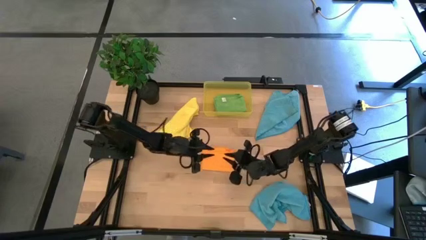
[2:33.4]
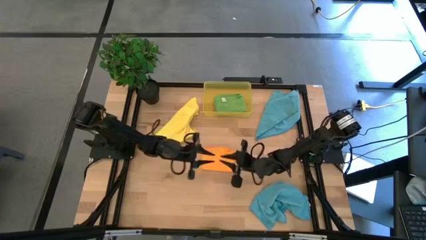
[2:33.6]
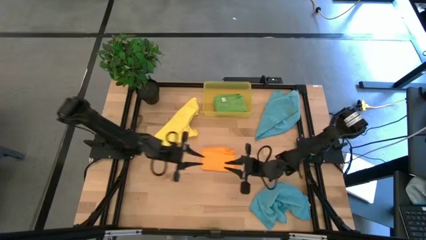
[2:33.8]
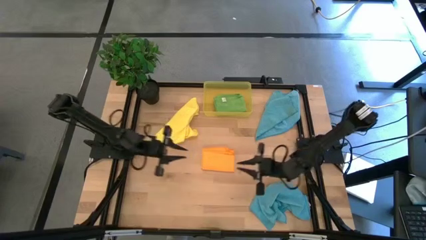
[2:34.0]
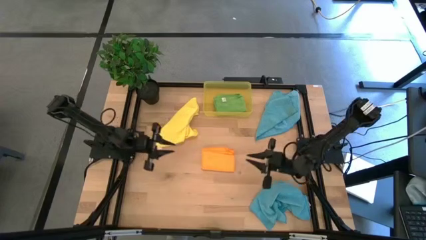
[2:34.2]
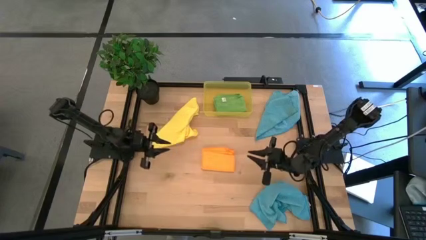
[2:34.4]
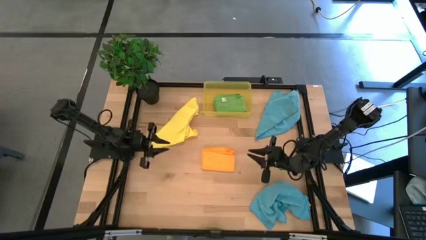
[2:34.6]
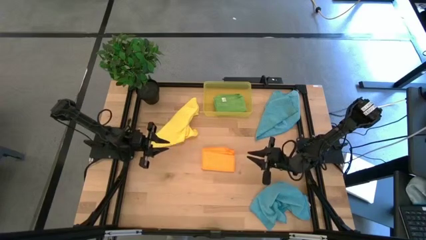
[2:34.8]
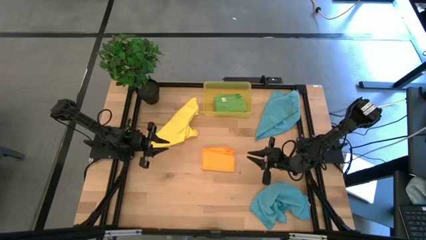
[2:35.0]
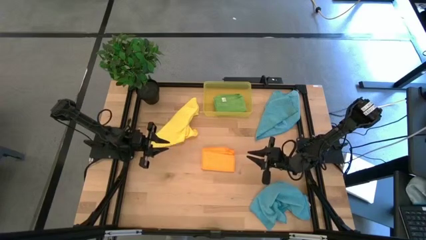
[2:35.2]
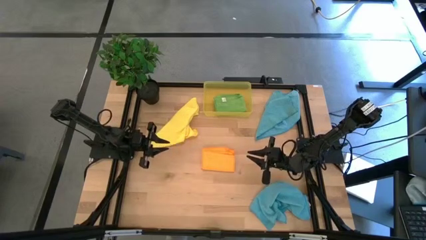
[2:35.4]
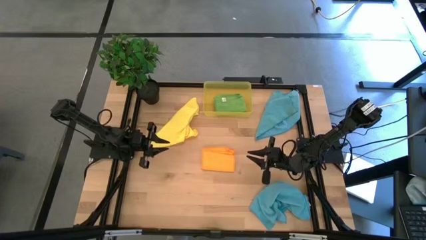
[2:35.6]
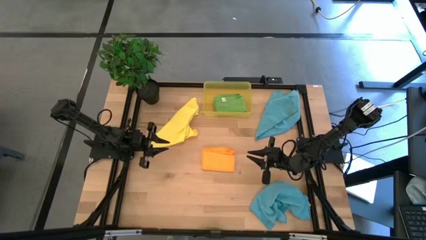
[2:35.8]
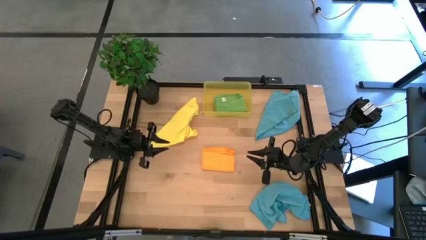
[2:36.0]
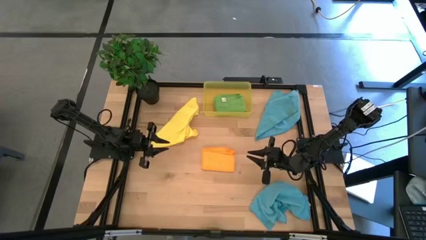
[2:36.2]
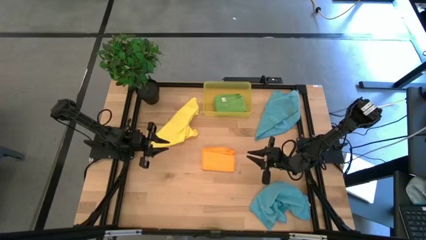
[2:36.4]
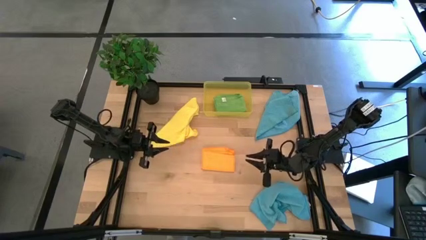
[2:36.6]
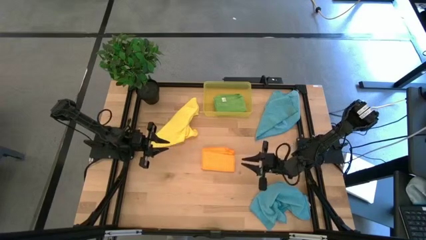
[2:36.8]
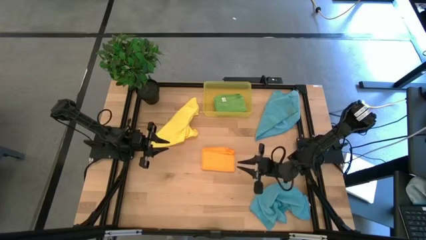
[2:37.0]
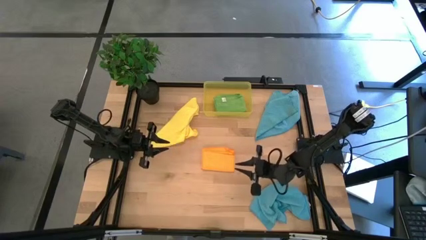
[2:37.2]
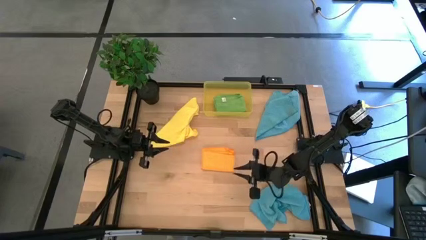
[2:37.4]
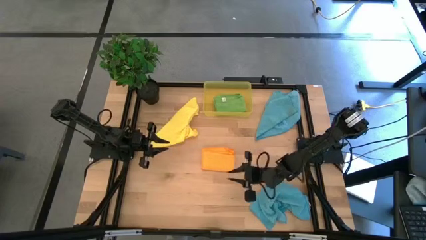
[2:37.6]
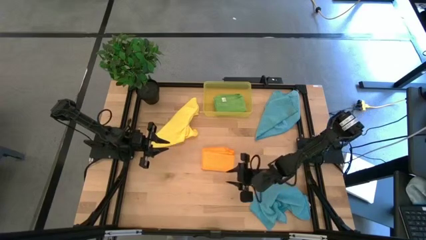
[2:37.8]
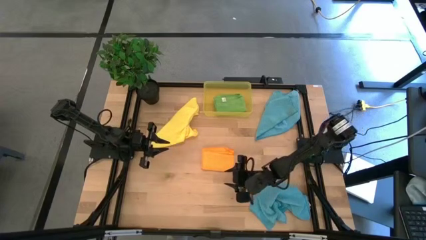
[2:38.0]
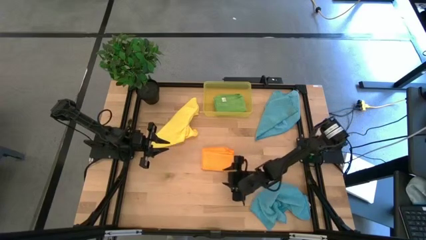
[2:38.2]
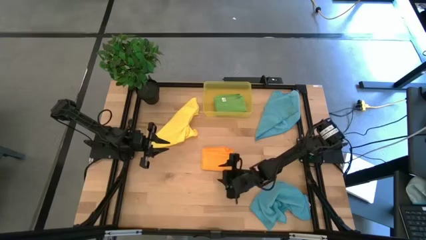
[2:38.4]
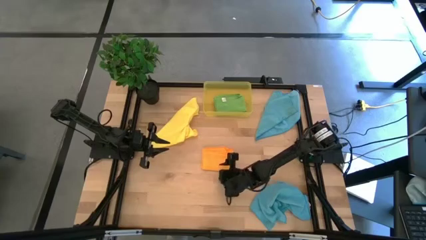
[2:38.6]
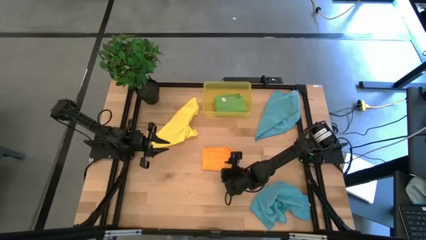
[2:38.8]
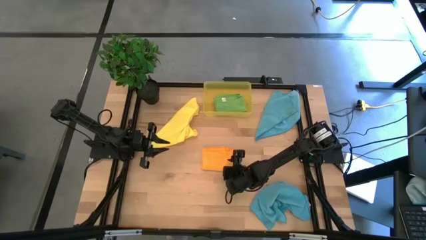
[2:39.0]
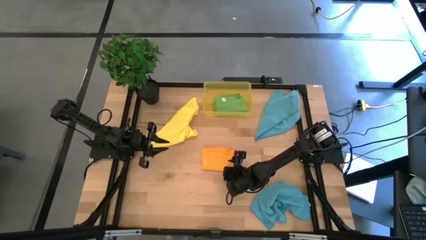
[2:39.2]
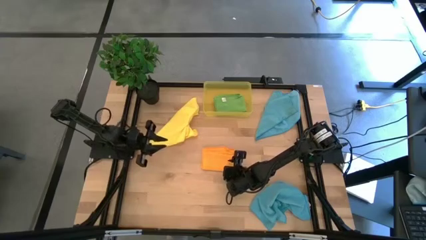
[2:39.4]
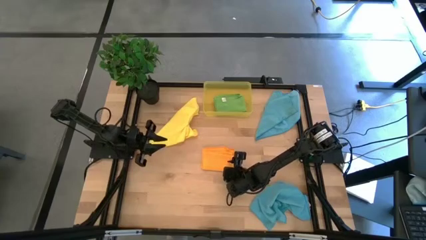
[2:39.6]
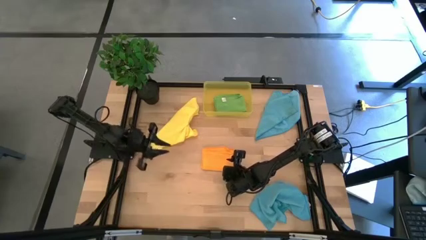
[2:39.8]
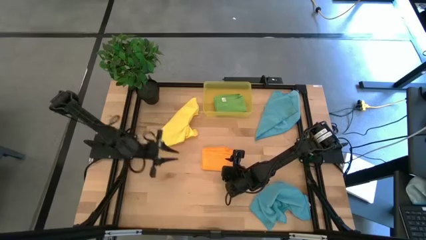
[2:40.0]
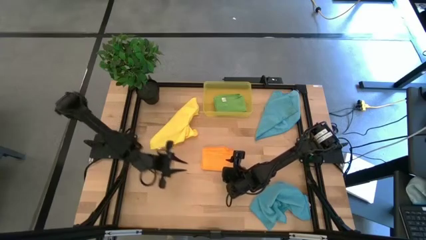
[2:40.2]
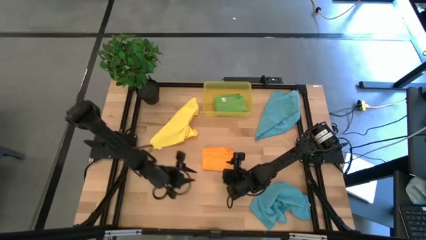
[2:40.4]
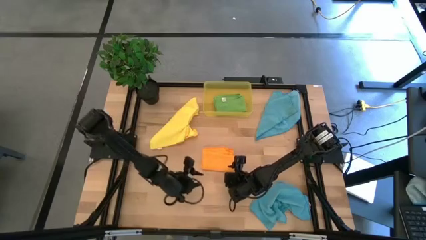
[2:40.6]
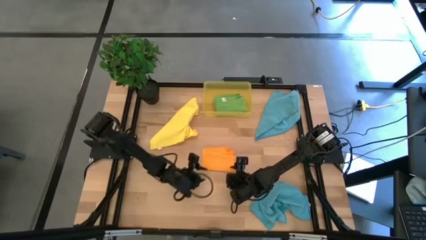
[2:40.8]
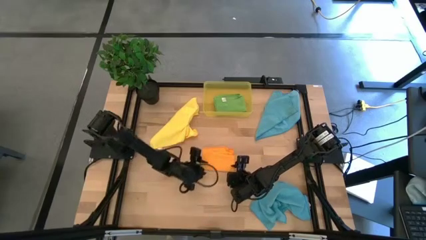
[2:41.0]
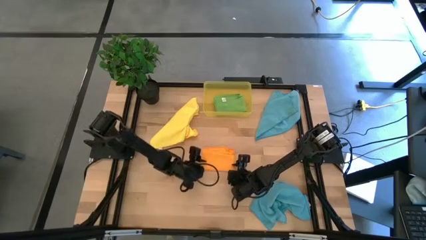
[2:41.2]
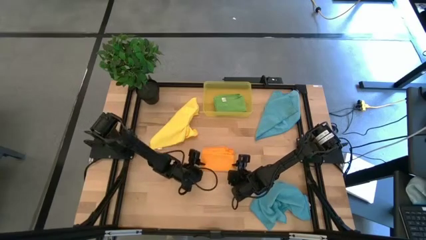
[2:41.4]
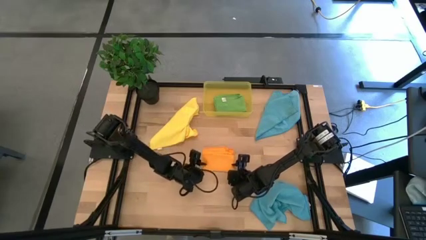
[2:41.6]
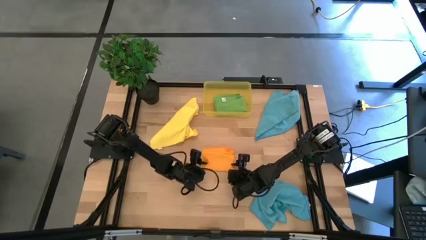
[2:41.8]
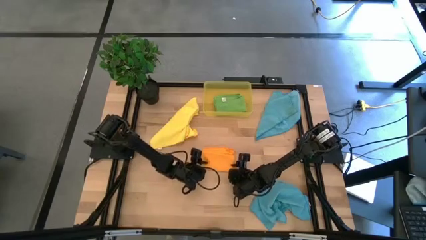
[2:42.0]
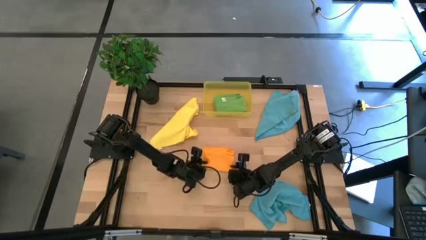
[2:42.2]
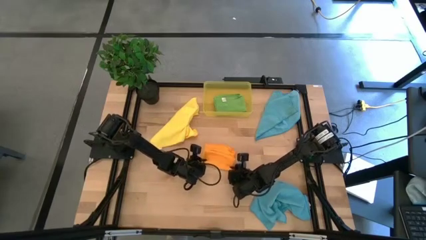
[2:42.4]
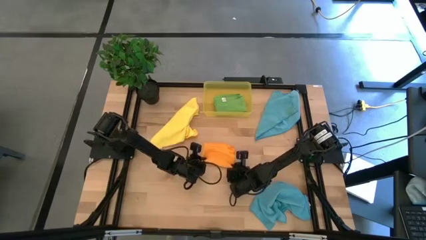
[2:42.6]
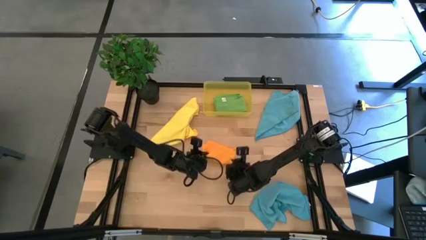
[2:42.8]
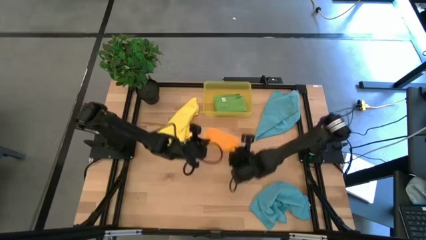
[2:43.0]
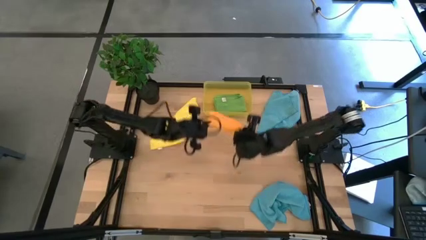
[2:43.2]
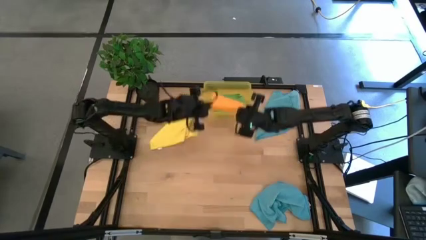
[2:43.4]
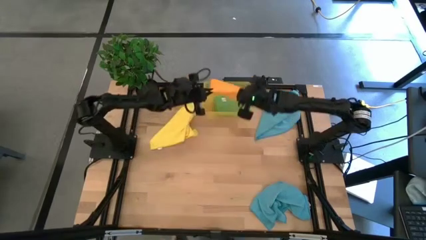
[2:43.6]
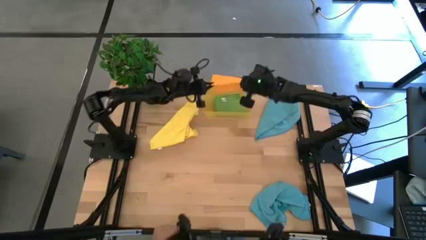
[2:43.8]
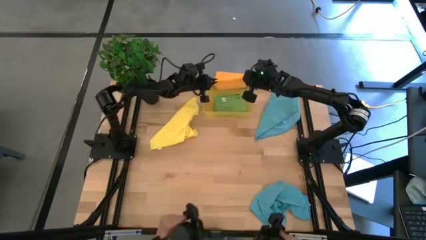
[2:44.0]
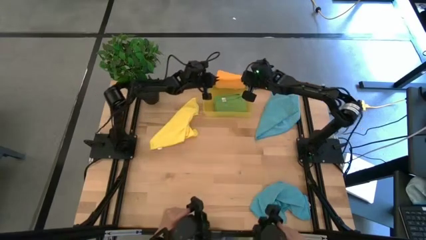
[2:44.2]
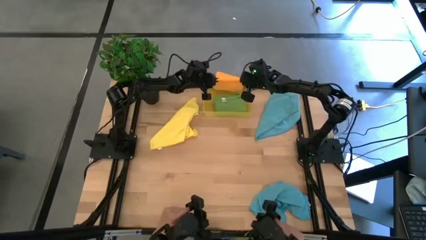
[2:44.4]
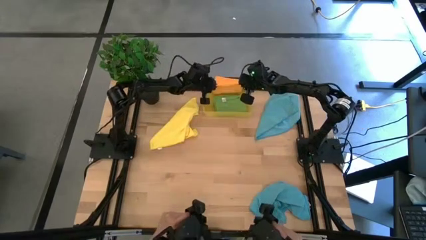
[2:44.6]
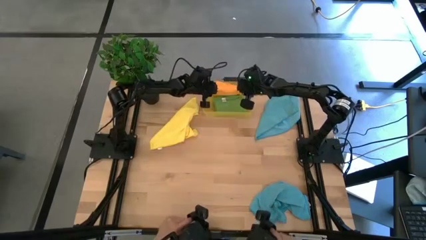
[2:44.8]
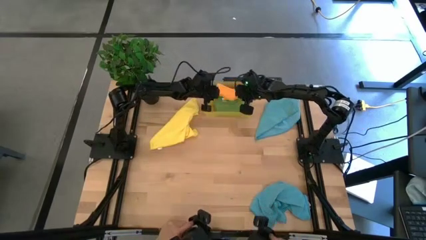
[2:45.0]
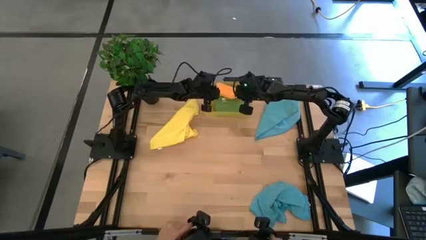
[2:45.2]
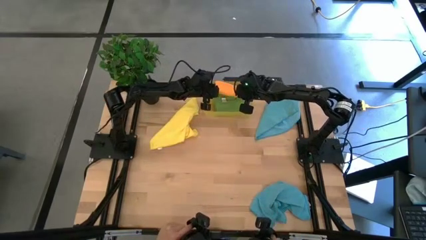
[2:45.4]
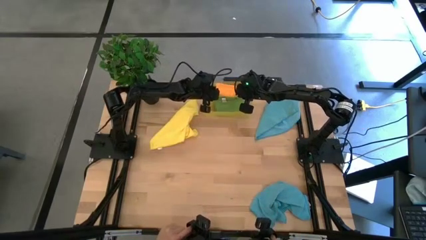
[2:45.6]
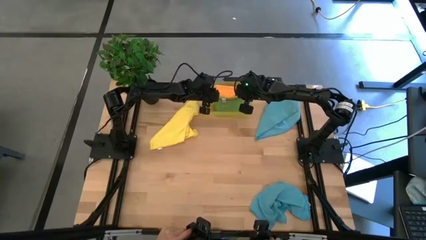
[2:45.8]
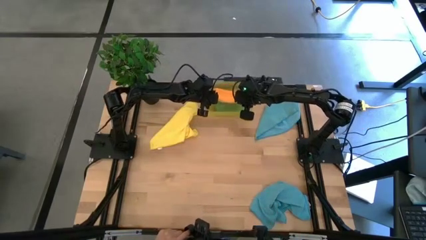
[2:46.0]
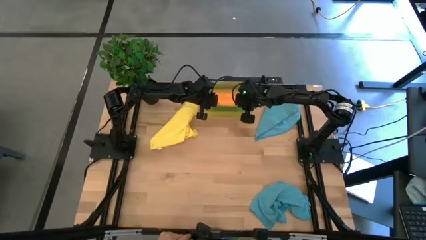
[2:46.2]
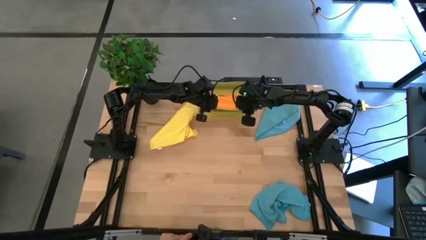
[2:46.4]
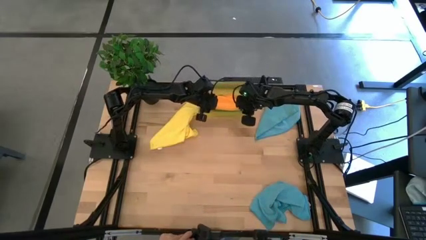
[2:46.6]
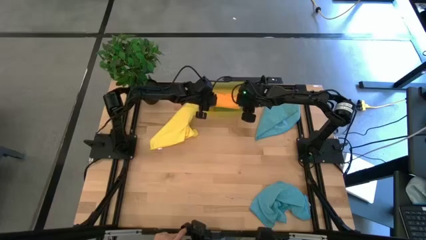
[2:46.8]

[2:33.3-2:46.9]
Task: Fold microfiber towels
Stack the folded orange microfiber cloth on top of the green microfiber cloth
